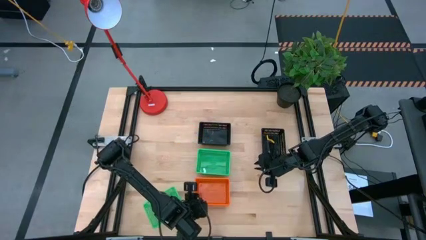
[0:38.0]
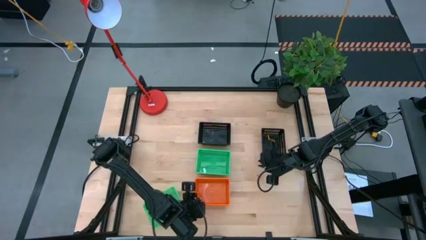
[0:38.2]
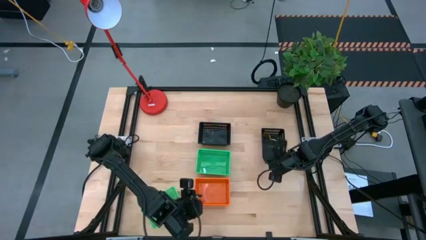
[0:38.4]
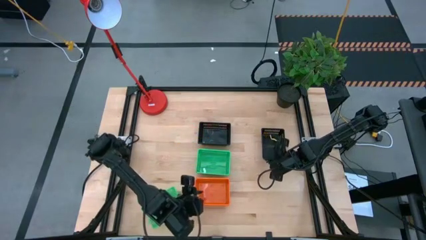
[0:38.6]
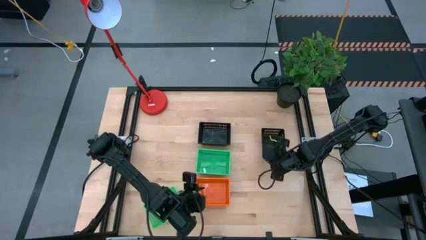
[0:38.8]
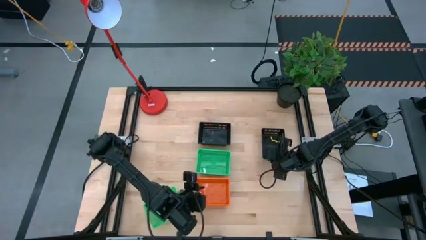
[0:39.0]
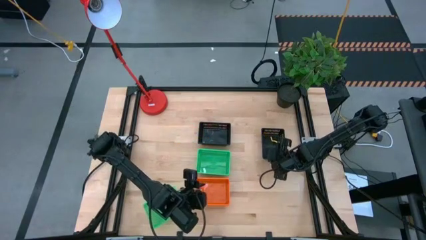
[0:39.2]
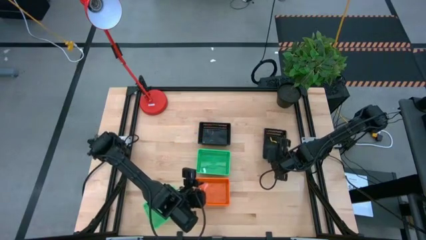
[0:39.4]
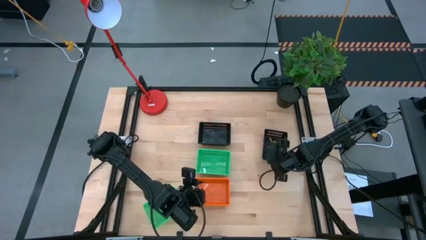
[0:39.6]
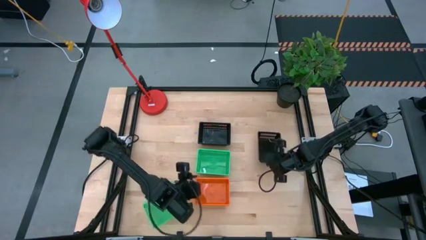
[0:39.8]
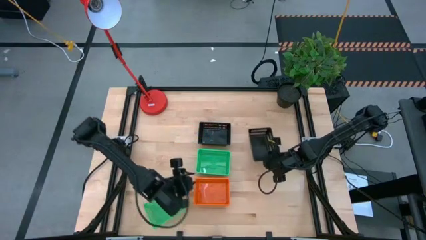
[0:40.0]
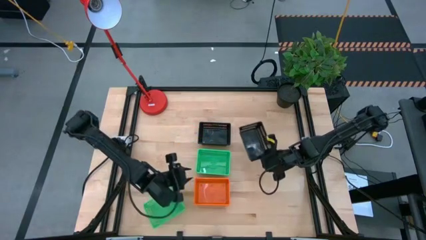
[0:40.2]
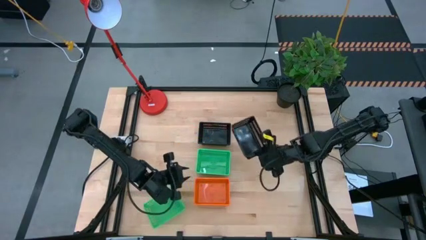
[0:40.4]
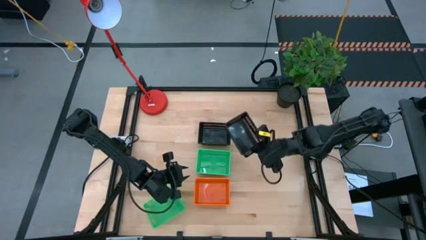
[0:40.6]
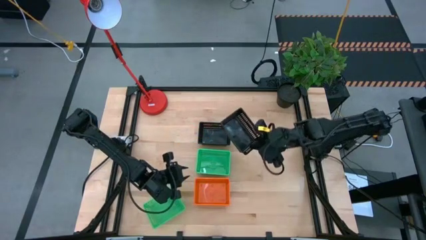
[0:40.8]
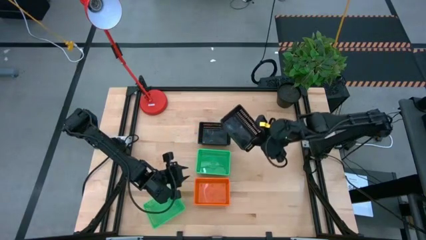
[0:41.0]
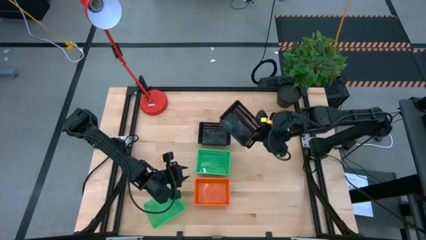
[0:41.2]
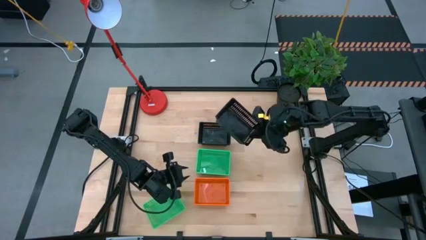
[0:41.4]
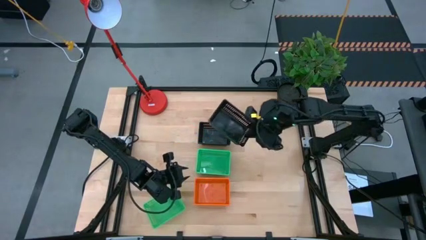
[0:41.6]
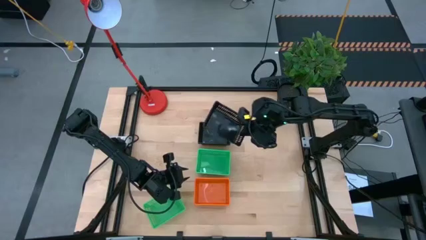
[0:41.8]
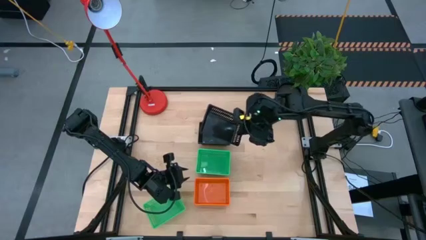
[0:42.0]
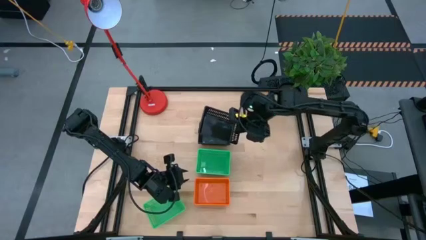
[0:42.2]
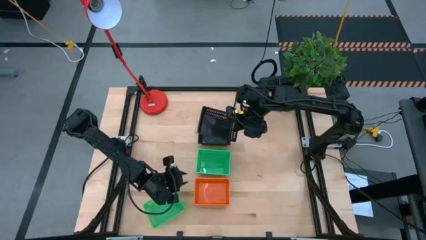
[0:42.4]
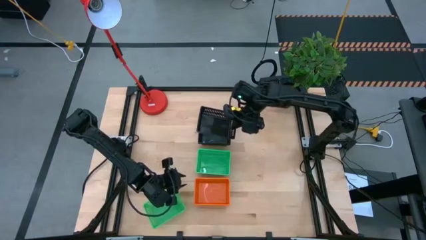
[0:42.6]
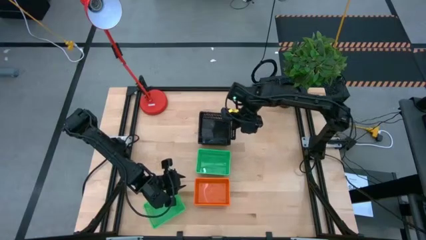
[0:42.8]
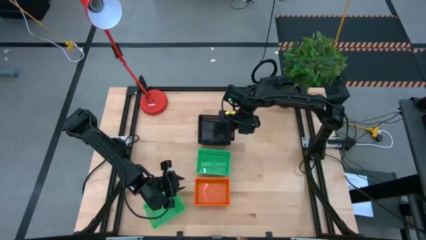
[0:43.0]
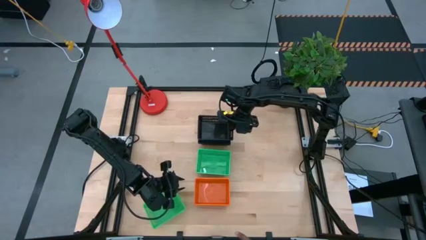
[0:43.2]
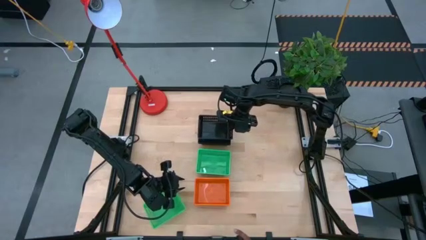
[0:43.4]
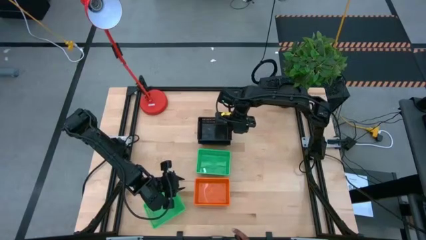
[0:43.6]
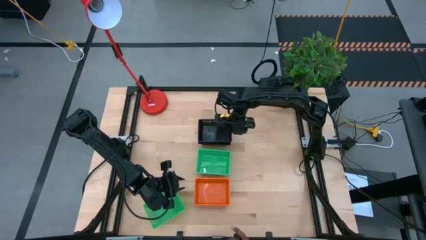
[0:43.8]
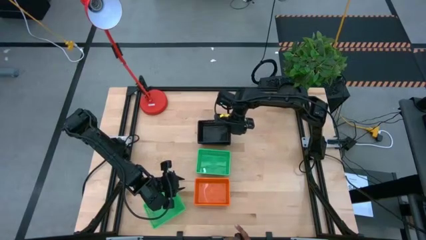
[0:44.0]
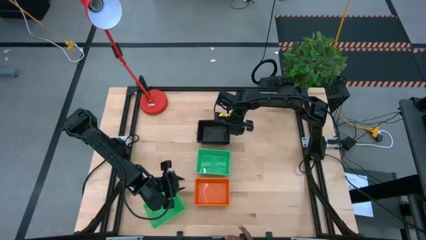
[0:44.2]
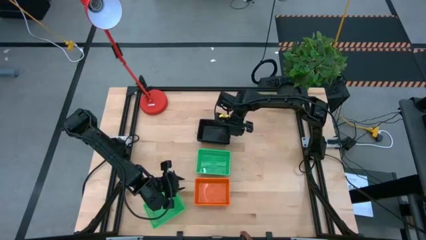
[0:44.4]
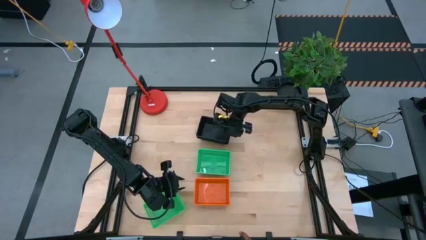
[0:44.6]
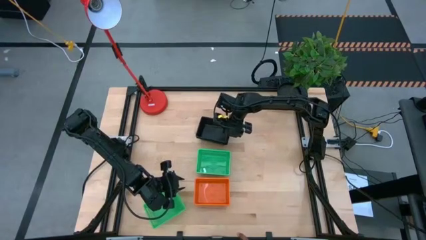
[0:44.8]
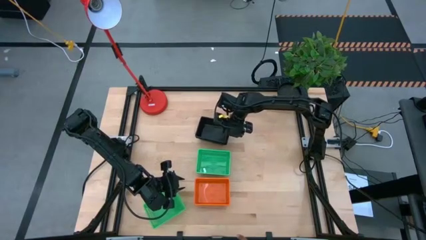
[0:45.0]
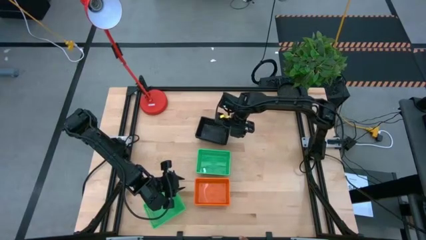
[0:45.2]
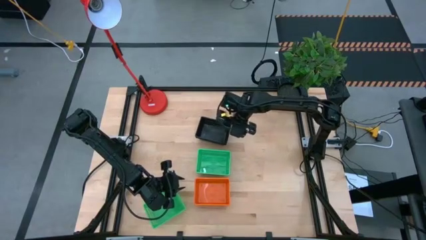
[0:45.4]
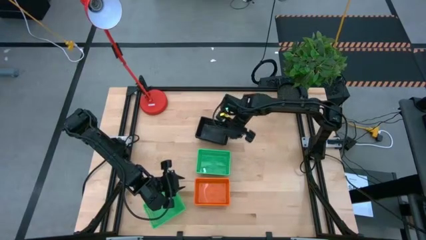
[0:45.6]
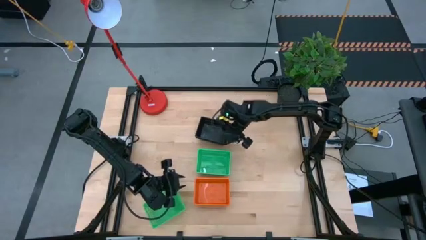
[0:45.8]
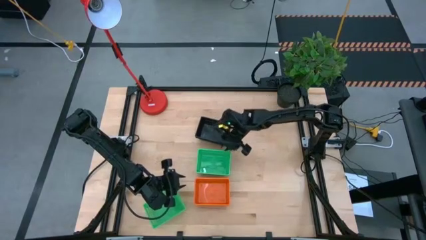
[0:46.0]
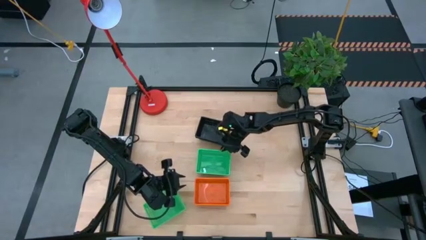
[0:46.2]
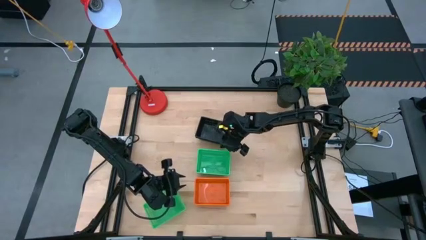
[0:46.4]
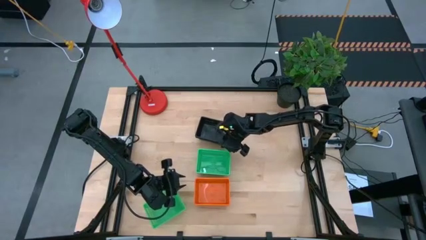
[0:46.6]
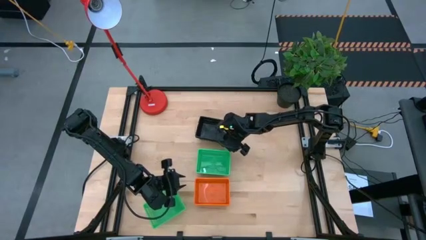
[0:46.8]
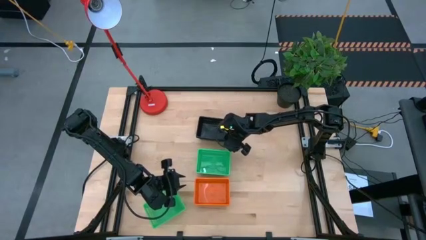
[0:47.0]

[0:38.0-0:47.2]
Stack the right black bin on top of the left black bin

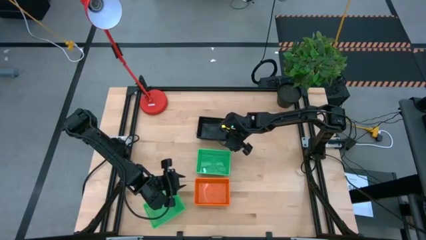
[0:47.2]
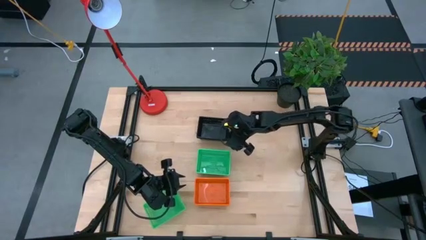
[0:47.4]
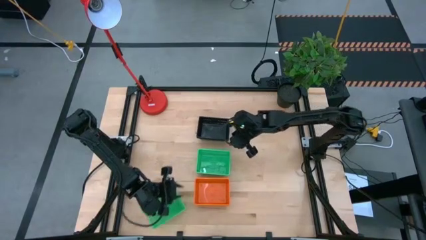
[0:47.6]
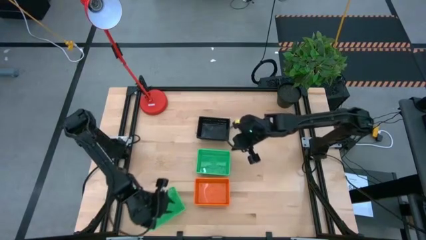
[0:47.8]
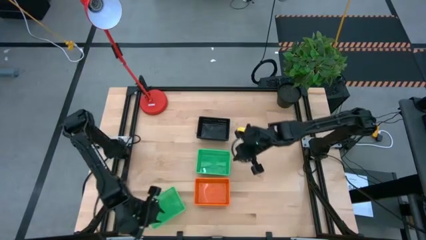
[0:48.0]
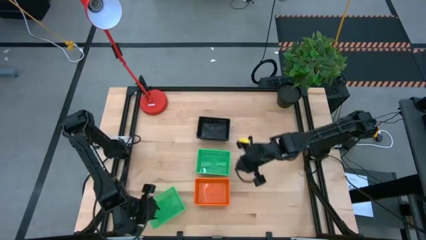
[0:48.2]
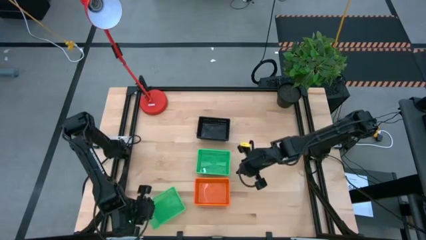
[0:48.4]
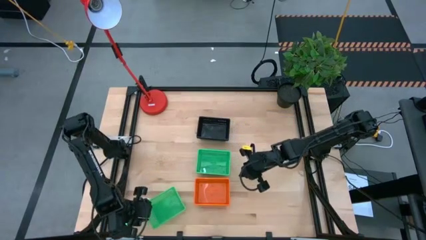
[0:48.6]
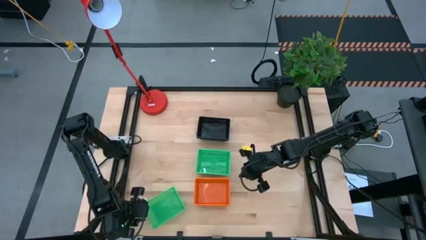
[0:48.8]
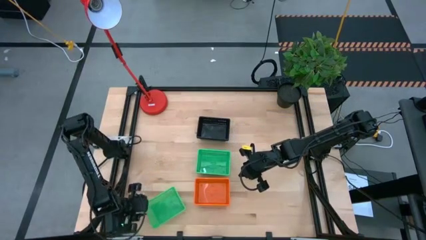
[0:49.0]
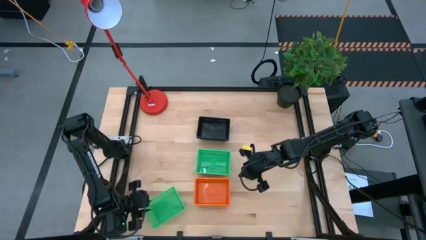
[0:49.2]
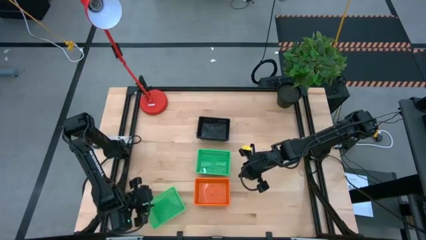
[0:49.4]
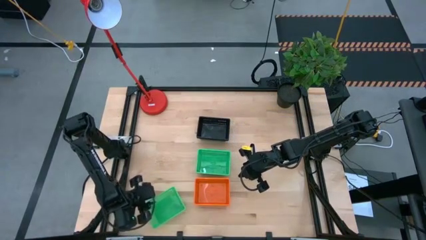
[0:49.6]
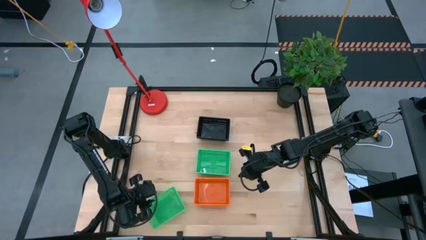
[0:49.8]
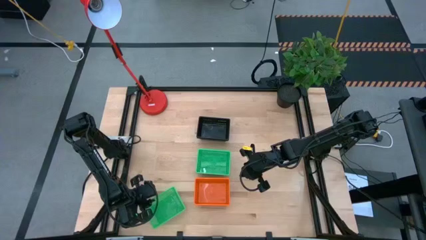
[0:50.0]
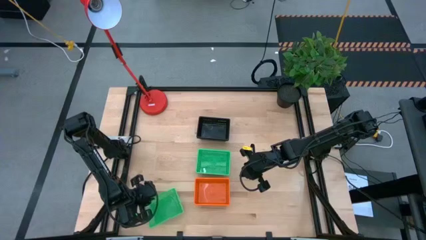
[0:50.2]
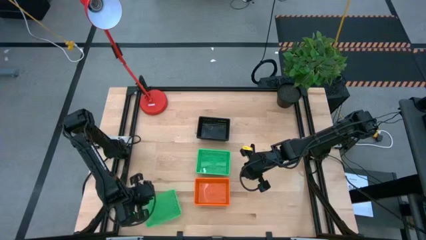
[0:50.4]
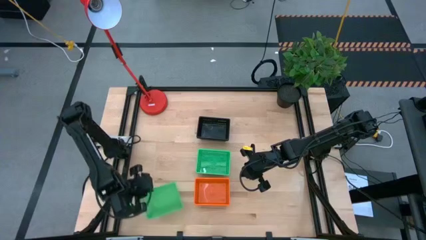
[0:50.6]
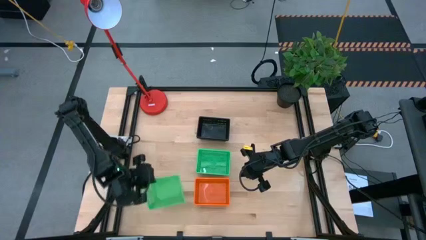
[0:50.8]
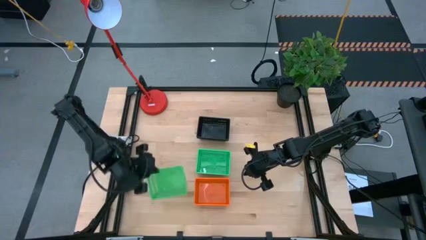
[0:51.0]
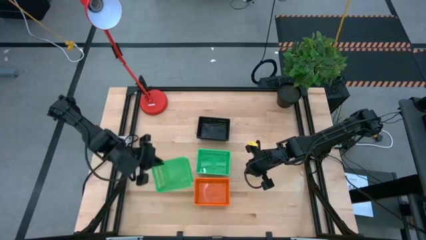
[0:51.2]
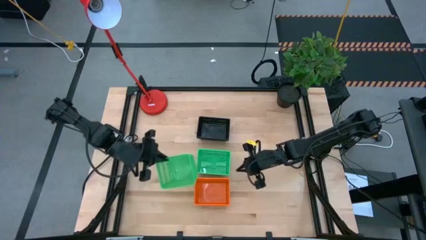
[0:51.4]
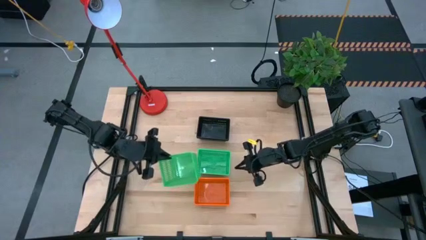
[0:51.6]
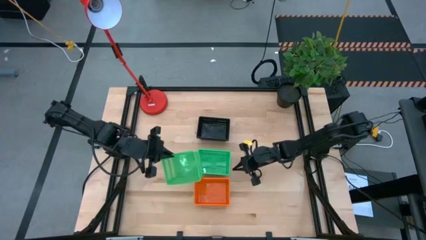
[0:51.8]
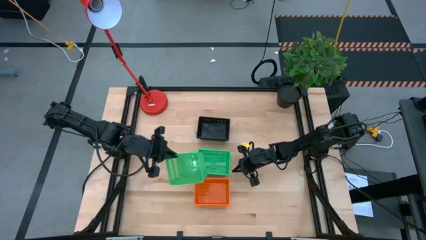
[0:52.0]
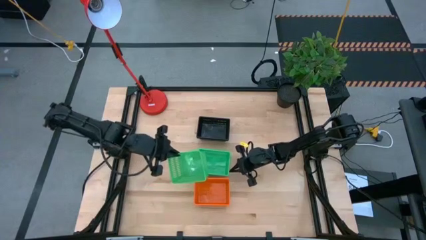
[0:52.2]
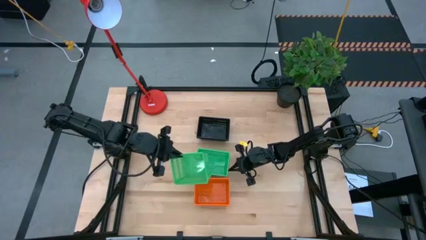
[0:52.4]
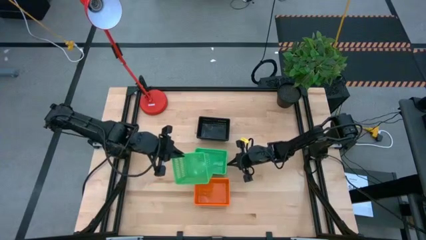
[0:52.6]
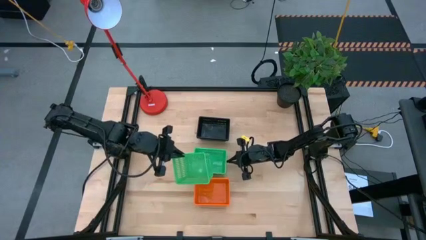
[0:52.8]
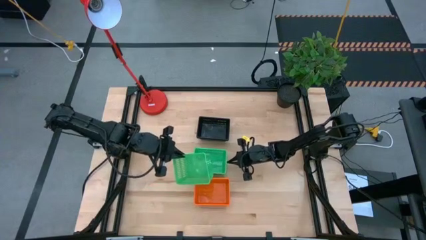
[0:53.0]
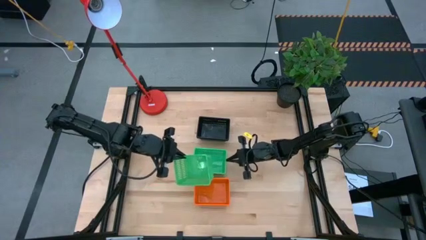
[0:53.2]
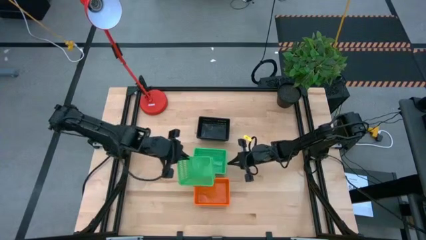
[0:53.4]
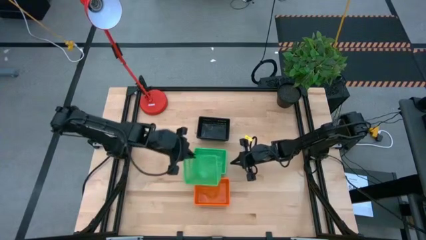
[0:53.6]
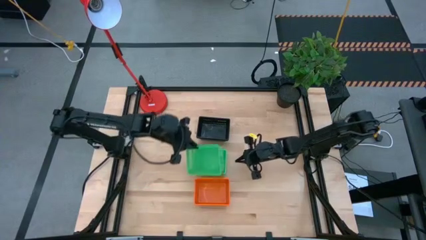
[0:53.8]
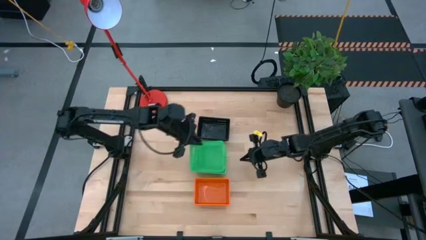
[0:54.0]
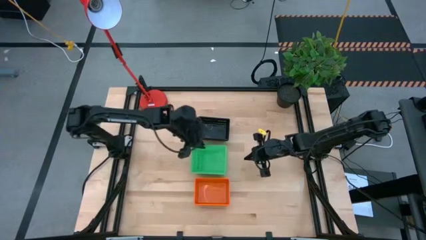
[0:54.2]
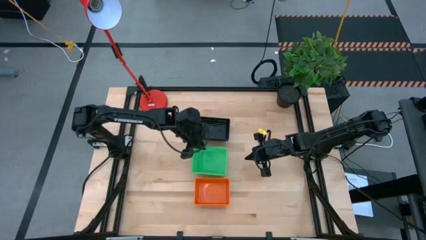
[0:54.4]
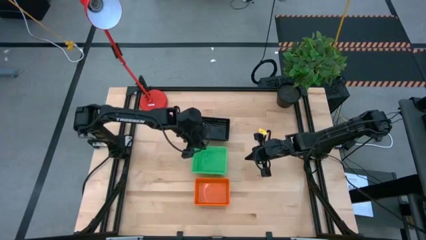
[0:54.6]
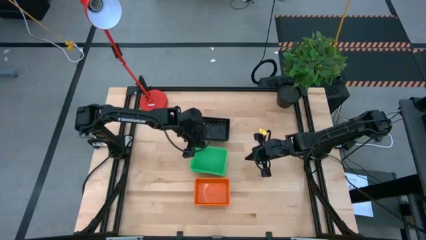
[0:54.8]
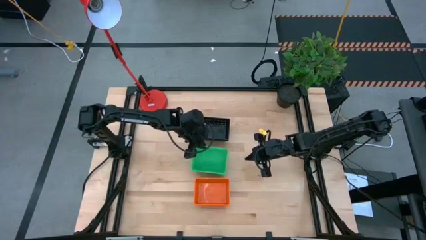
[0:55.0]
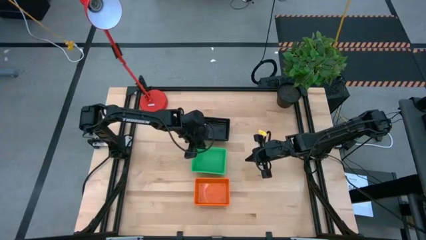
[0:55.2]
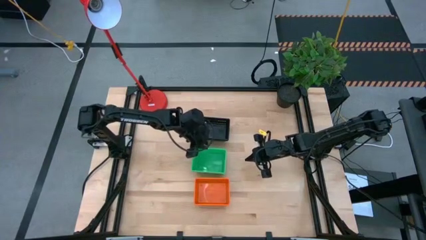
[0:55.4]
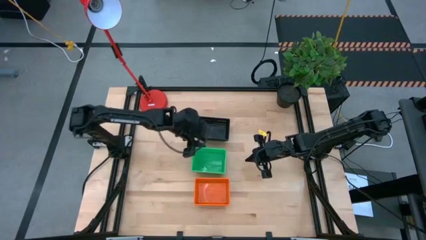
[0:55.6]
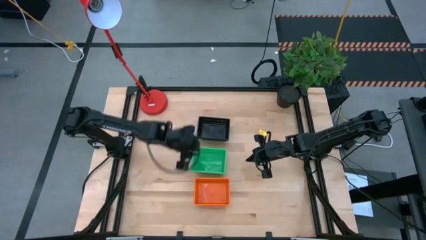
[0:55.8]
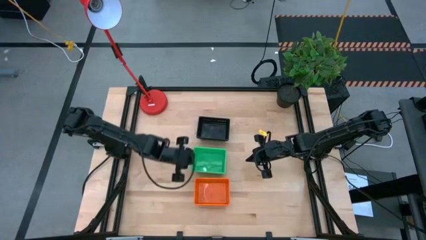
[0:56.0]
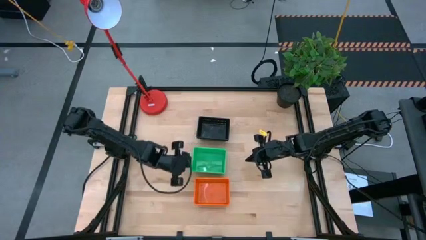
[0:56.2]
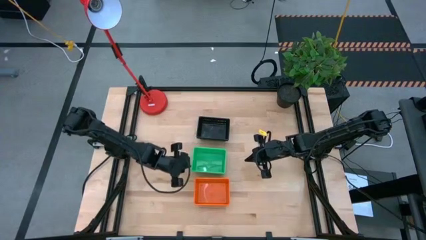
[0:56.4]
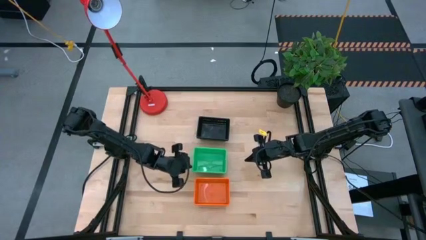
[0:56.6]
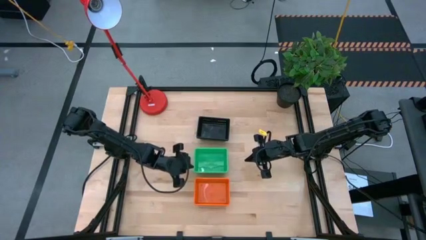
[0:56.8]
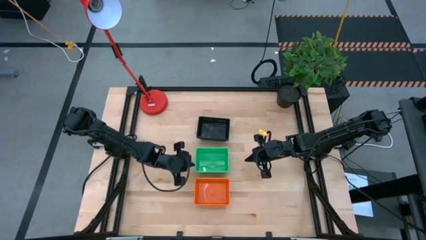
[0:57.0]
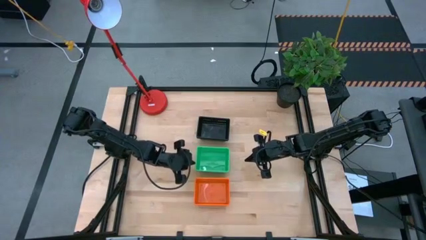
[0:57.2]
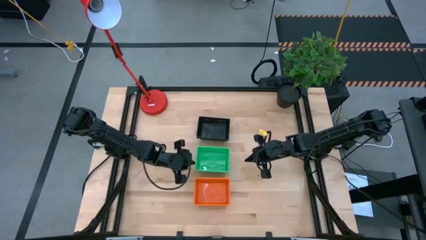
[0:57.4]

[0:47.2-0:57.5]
Stack the bottom green bin top of the top green bin
